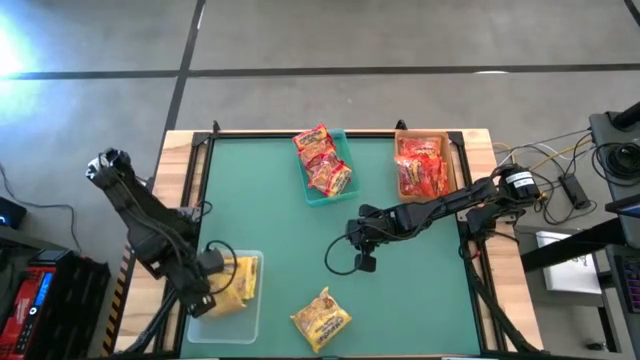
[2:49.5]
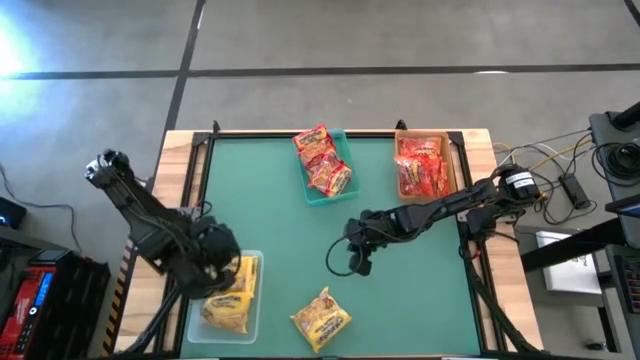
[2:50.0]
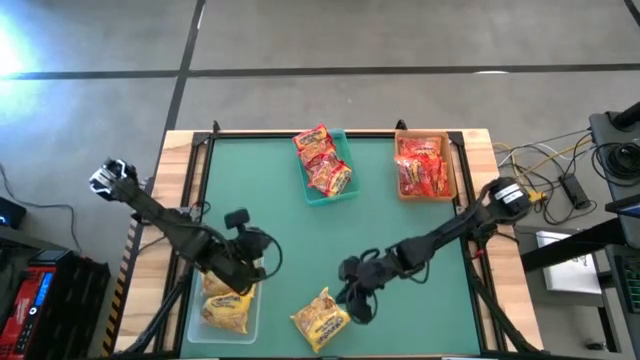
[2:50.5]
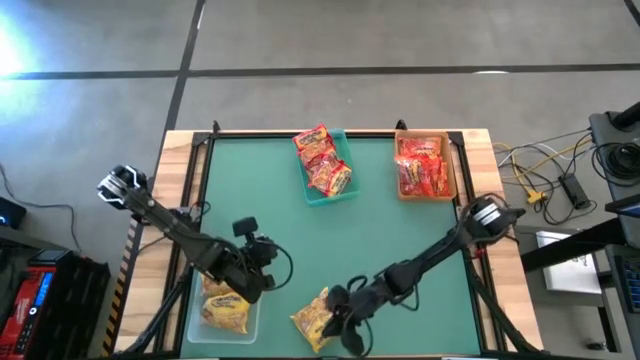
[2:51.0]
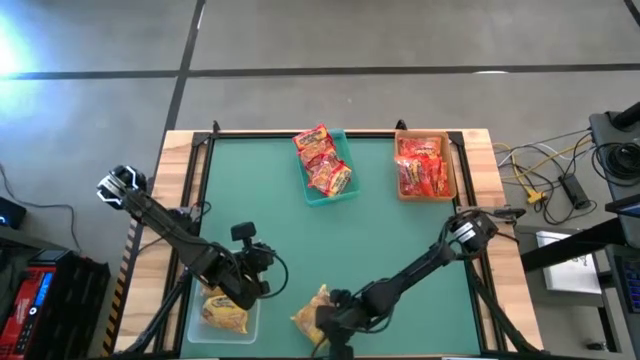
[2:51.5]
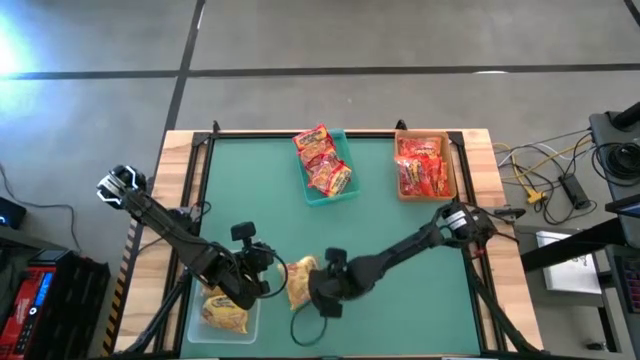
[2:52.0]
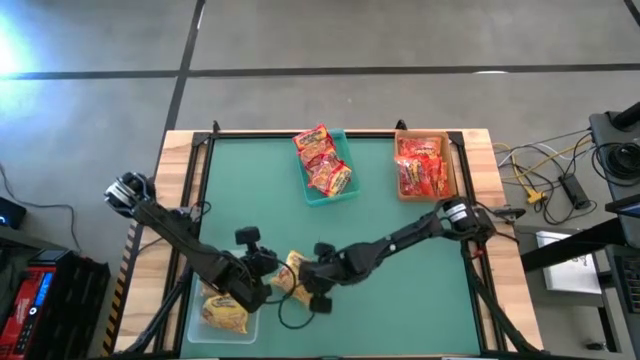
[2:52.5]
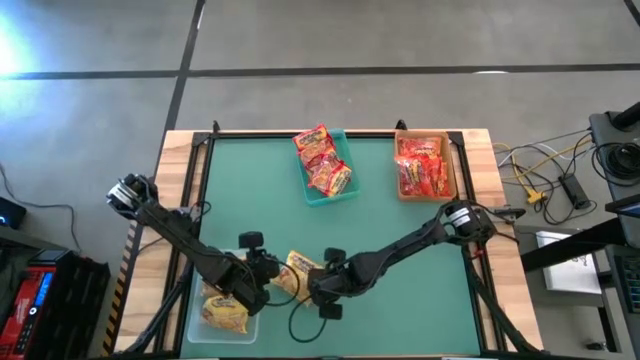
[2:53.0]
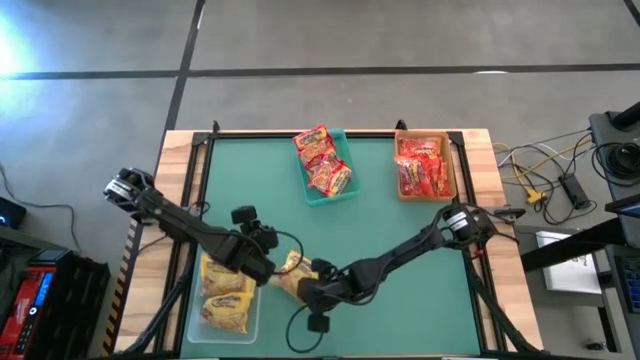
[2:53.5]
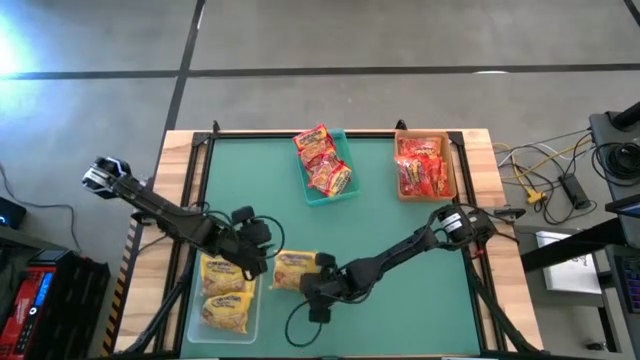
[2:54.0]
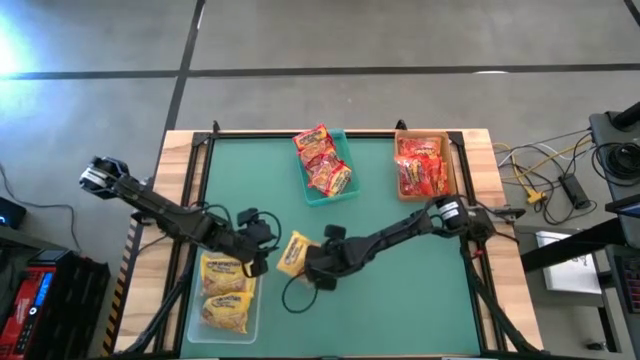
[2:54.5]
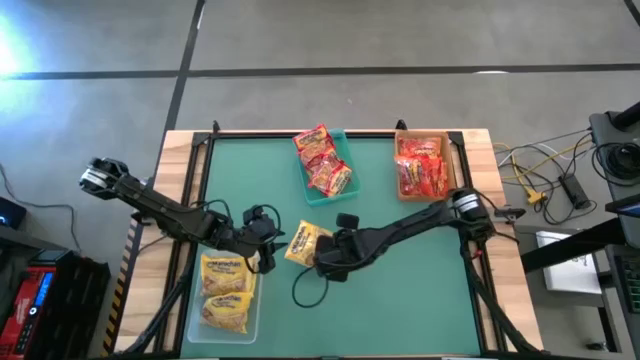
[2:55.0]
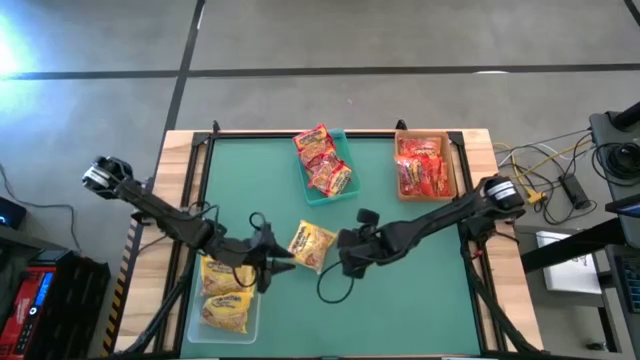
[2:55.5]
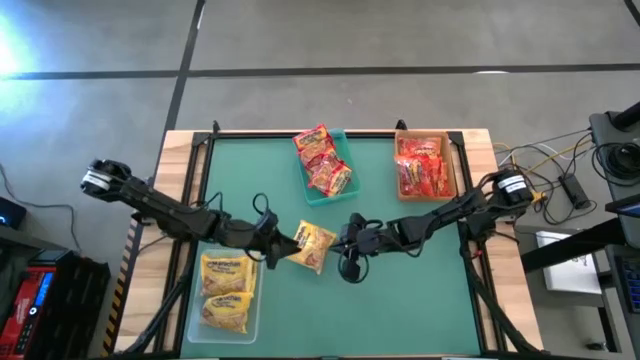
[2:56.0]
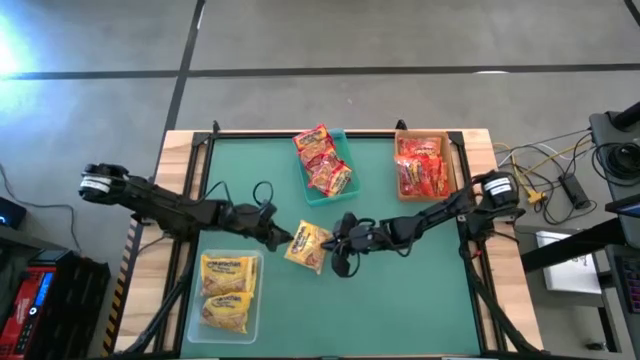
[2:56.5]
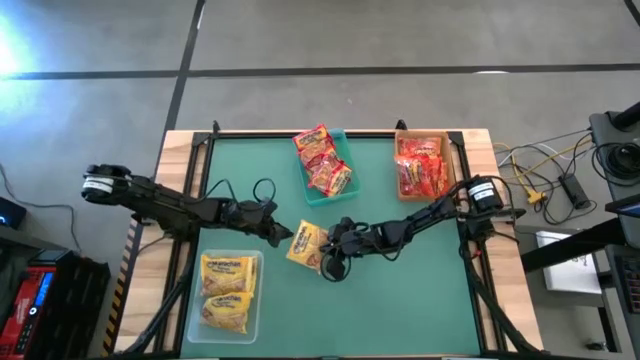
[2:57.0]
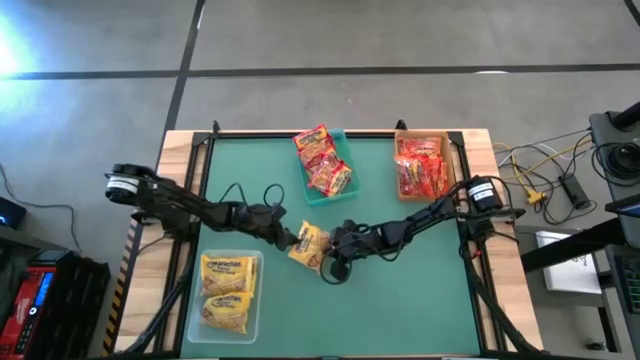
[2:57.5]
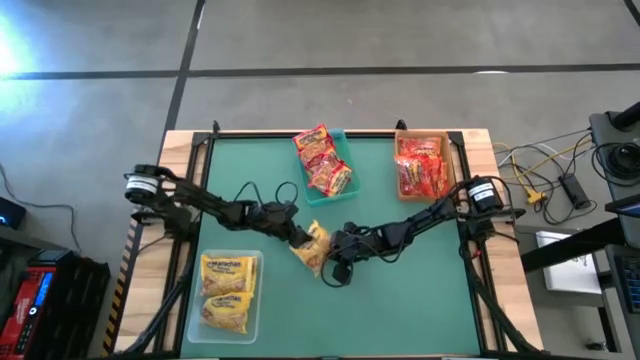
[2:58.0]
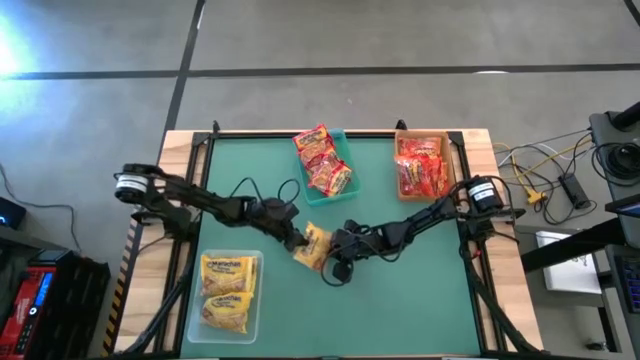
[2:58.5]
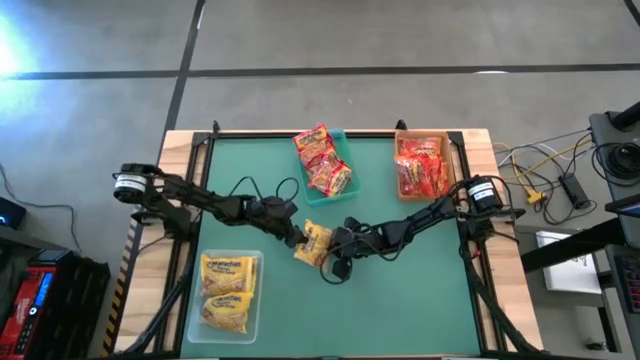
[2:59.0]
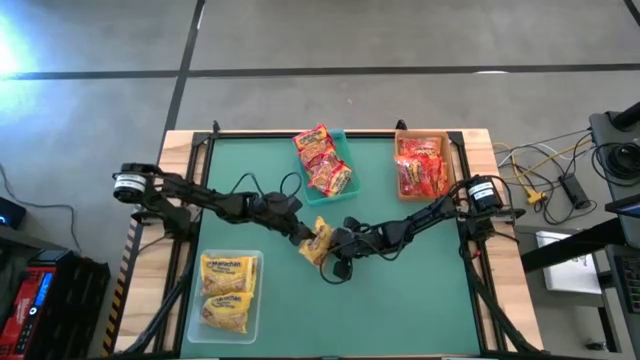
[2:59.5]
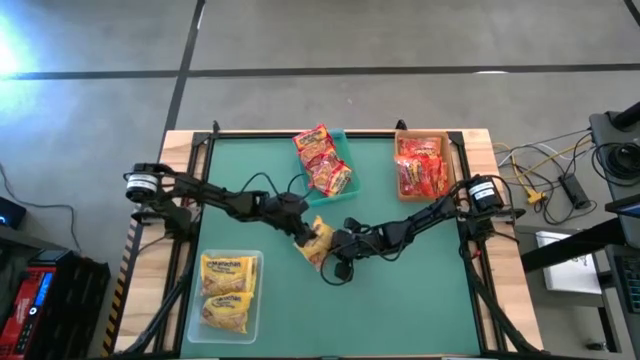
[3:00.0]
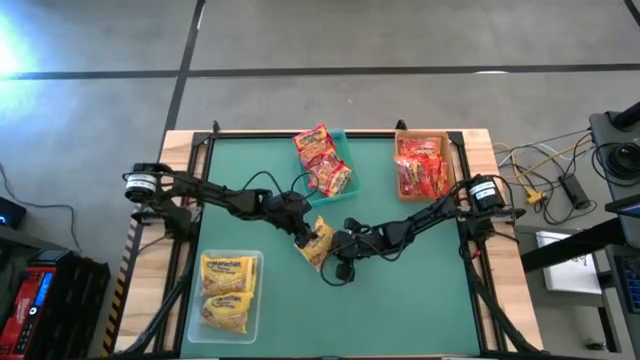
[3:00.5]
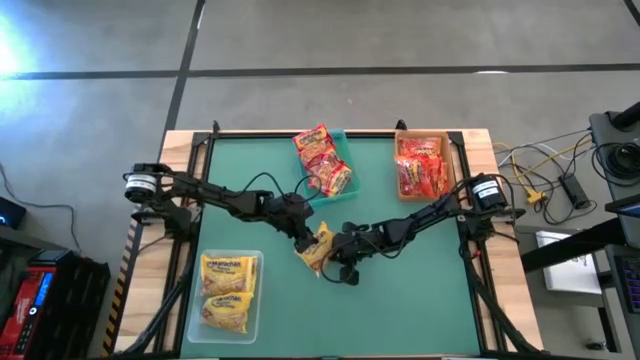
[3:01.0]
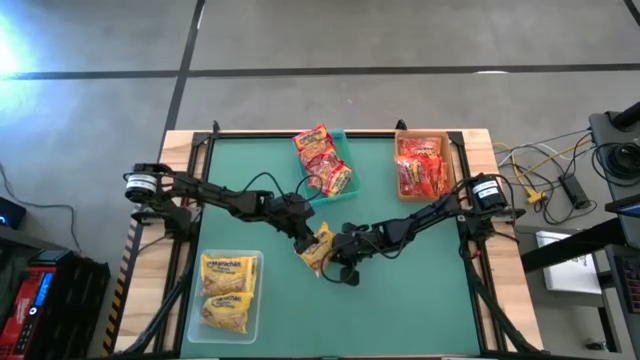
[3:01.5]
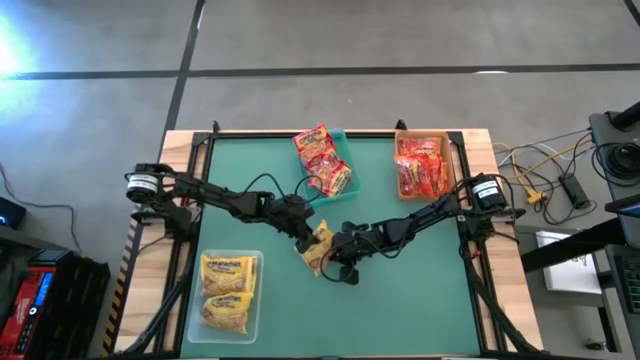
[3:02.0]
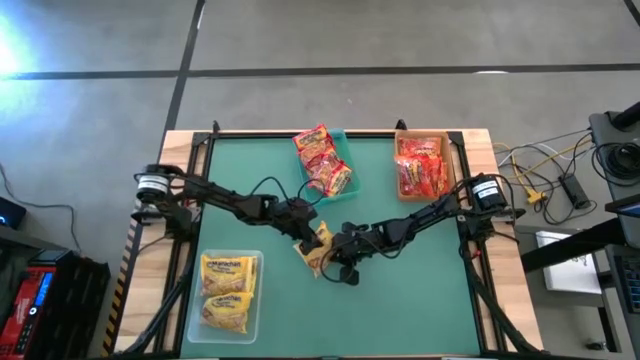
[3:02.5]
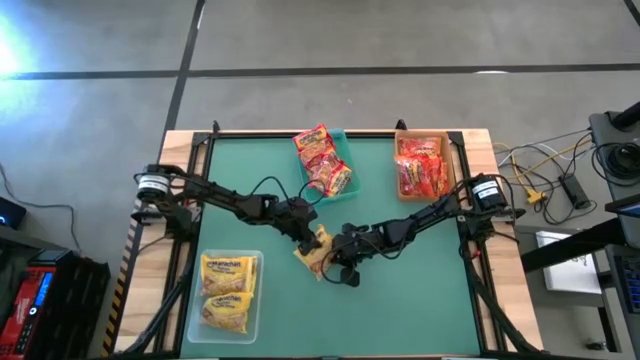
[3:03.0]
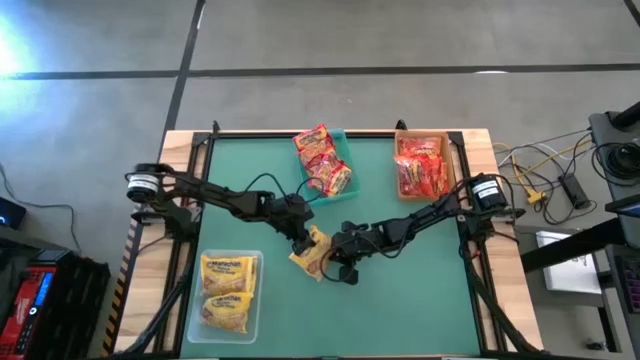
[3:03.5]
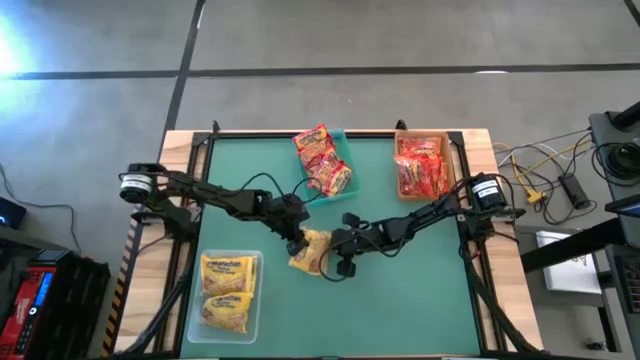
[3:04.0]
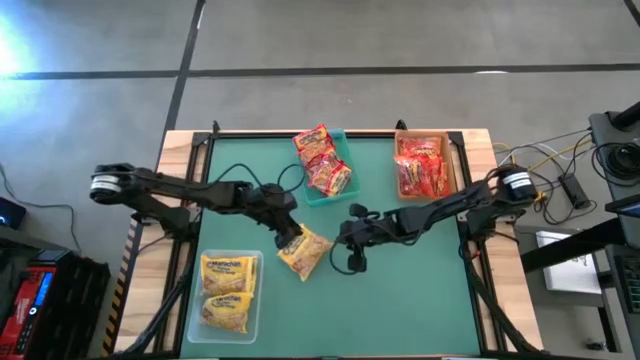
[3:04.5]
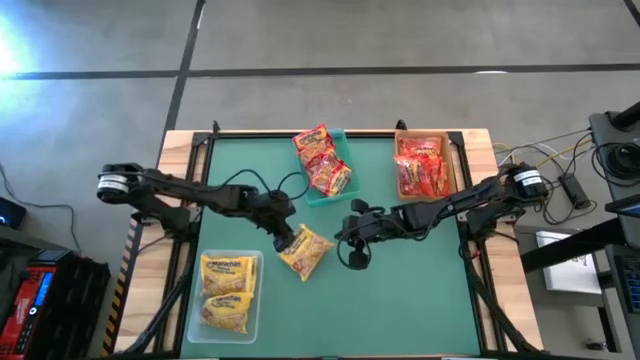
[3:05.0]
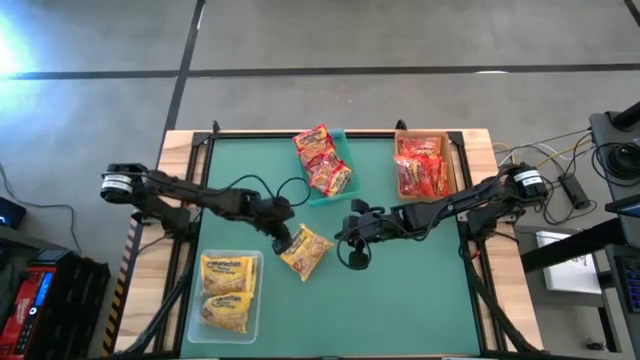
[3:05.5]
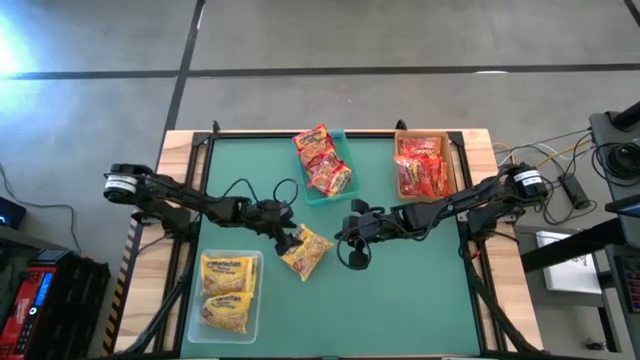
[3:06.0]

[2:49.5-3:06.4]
Task: Sort Maruchan noodles
Put the yellow noodle pack into the transparent bin

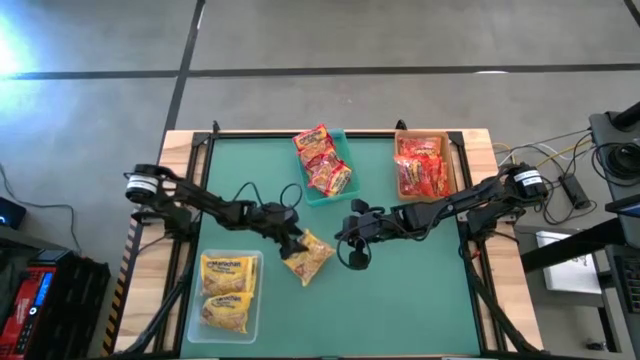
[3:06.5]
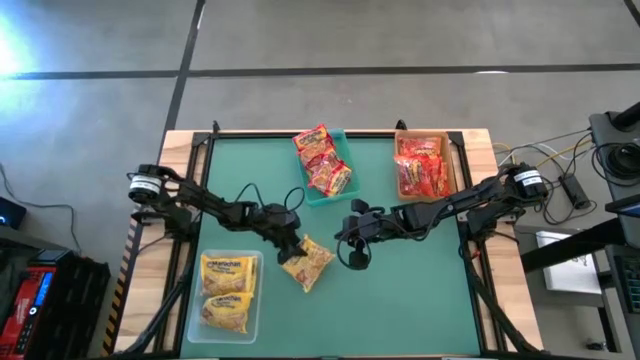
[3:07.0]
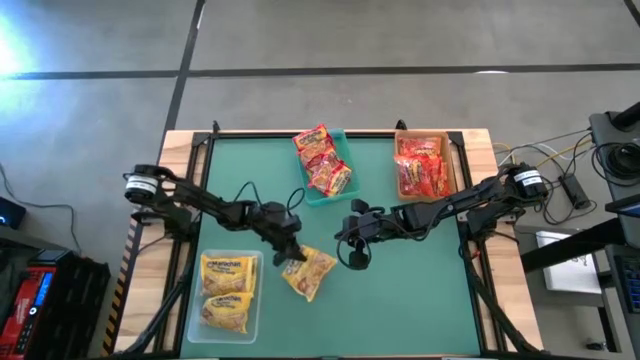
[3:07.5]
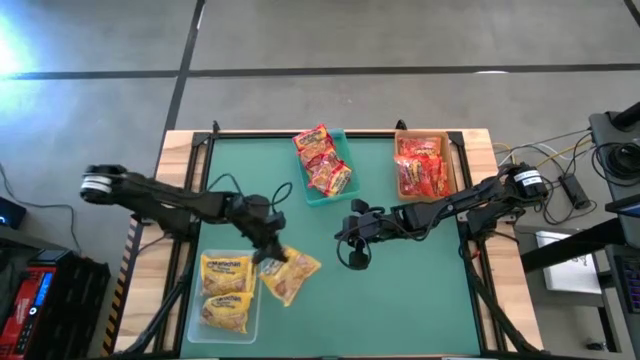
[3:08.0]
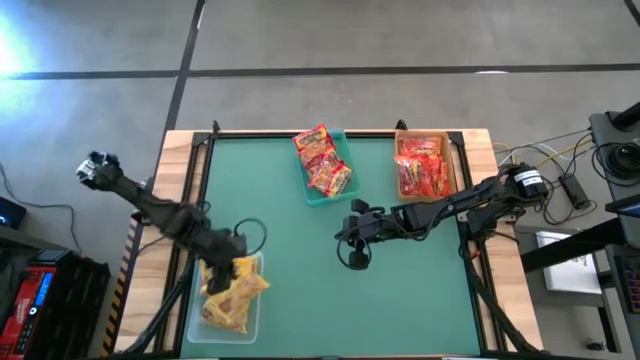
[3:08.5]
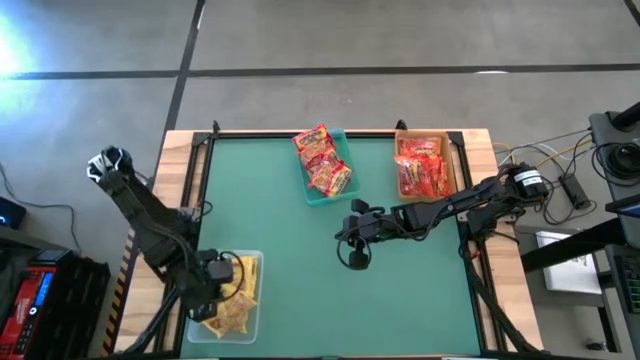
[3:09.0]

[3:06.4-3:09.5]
Put the yellow noodle pack into the transparent bin

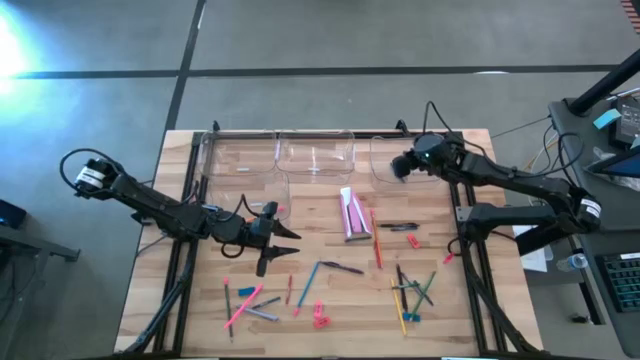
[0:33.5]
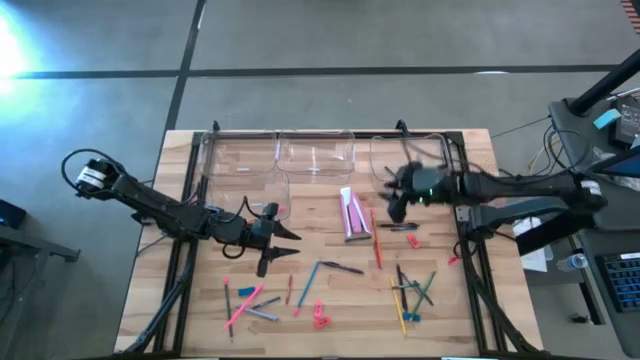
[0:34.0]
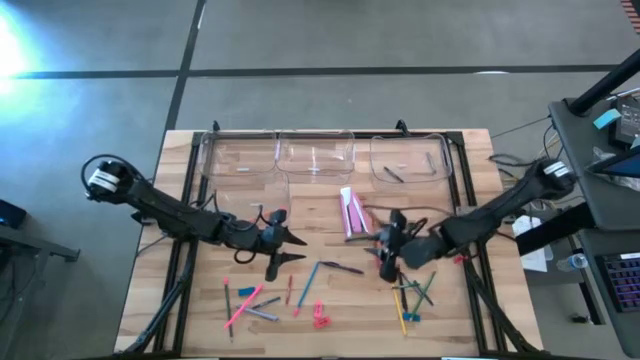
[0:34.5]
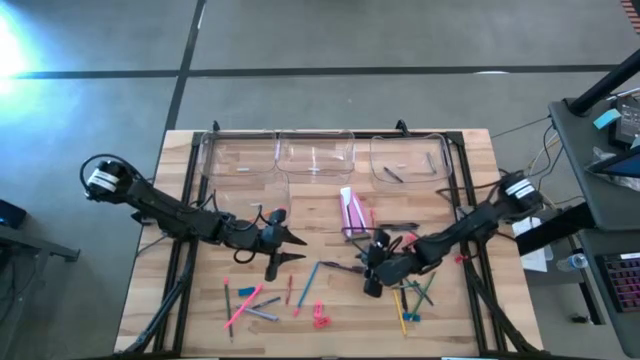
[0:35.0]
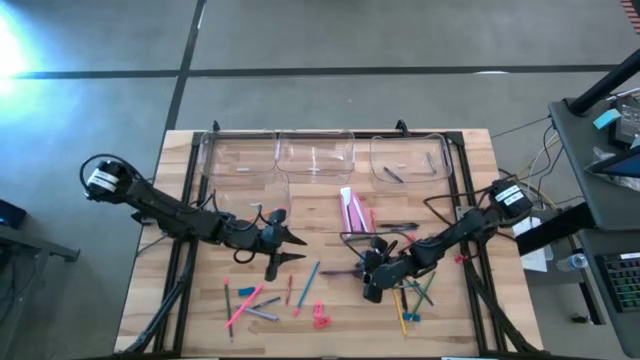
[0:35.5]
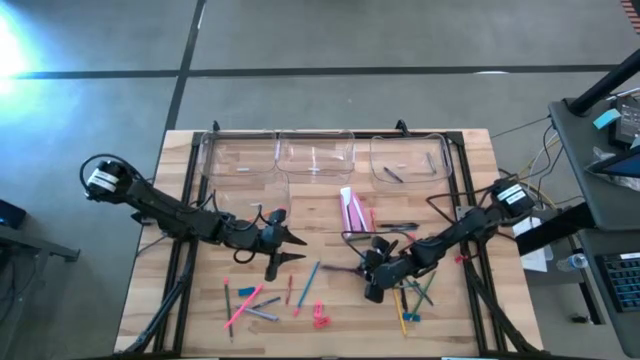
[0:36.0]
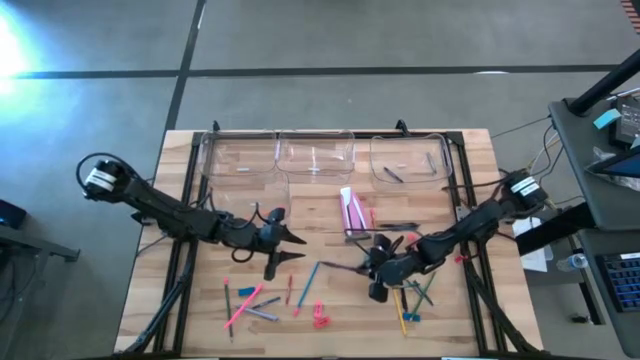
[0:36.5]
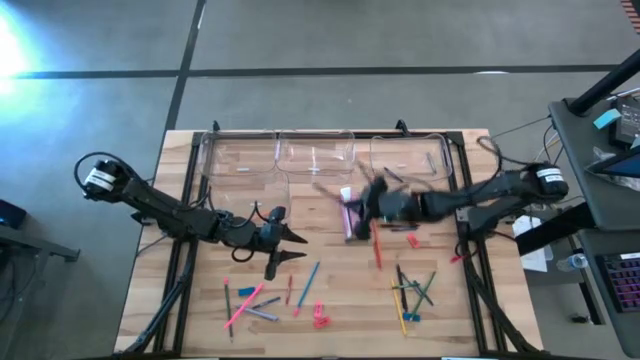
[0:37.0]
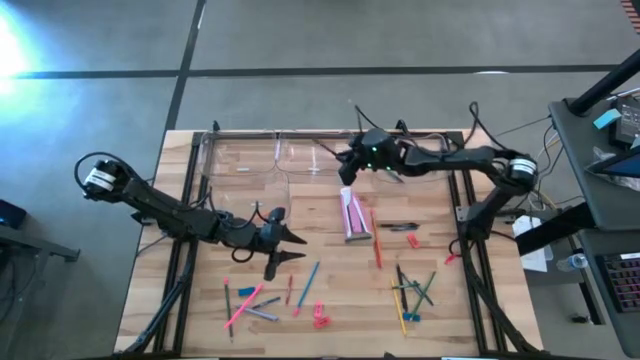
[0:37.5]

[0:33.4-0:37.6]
Task: Sort crayons/erasers/pens/pencils in bins
Put the violet pen into the top middle transparent bin
